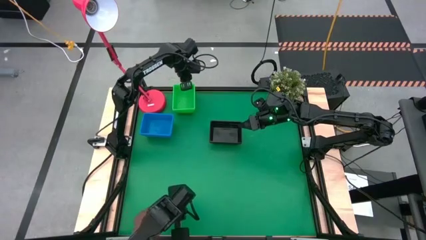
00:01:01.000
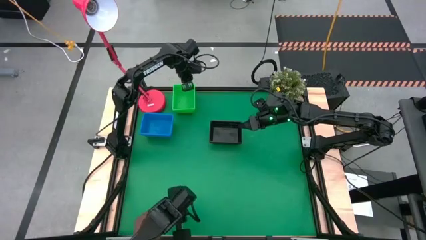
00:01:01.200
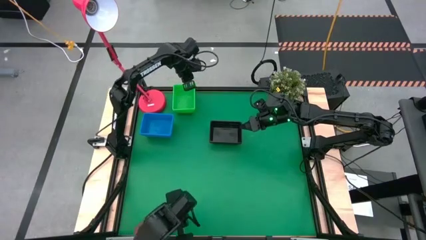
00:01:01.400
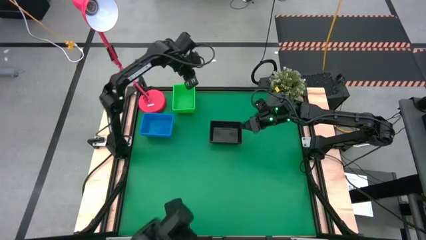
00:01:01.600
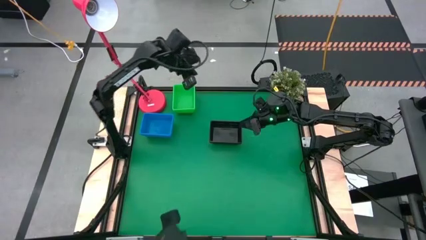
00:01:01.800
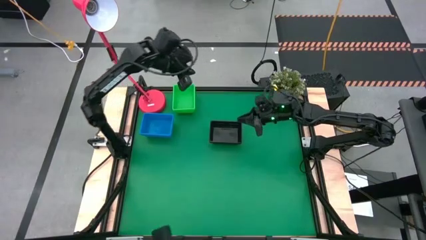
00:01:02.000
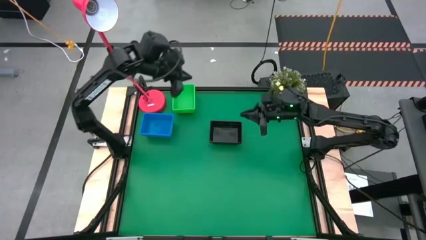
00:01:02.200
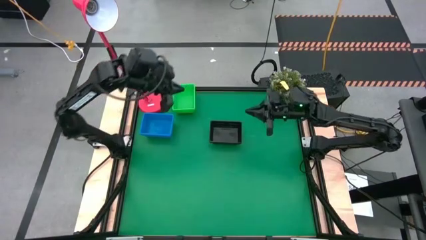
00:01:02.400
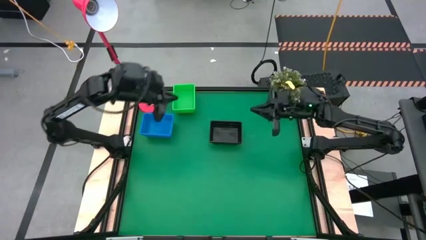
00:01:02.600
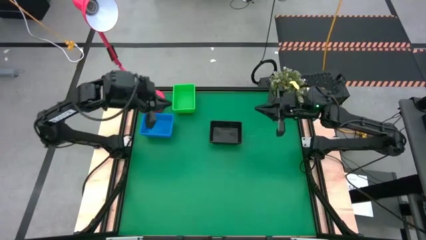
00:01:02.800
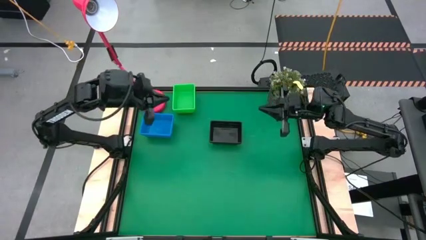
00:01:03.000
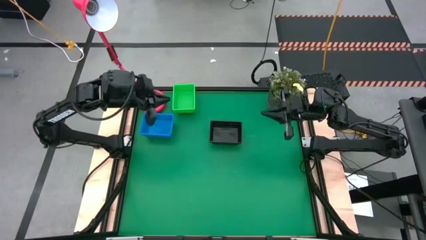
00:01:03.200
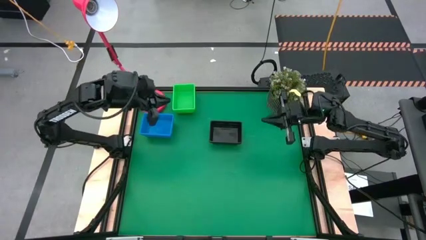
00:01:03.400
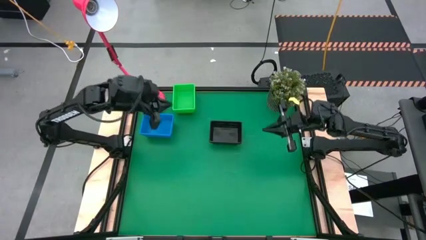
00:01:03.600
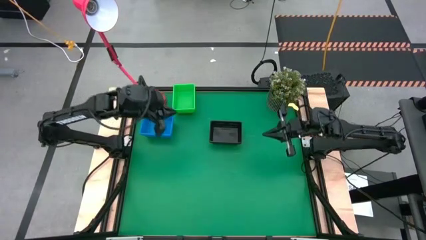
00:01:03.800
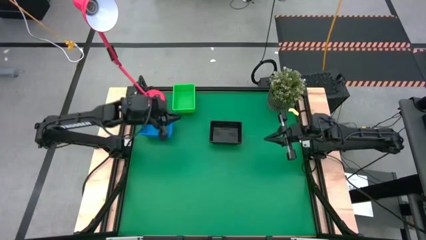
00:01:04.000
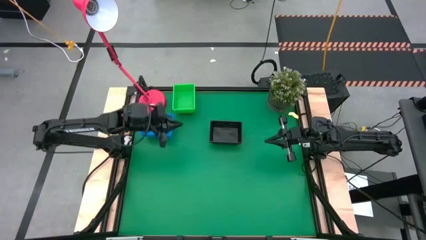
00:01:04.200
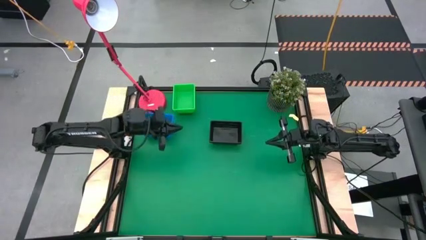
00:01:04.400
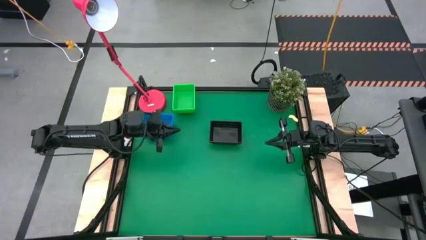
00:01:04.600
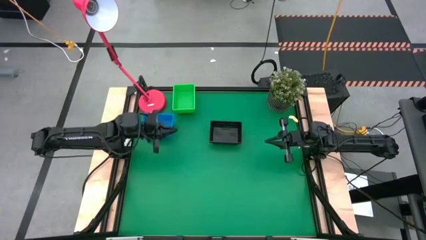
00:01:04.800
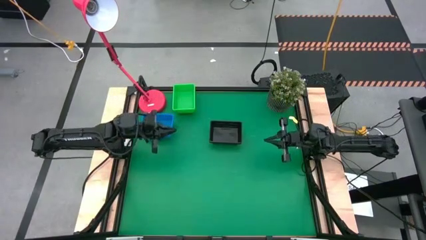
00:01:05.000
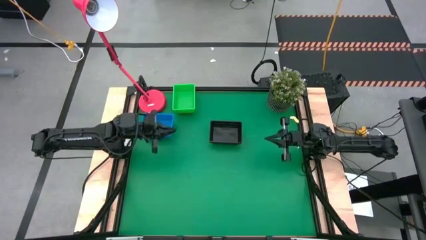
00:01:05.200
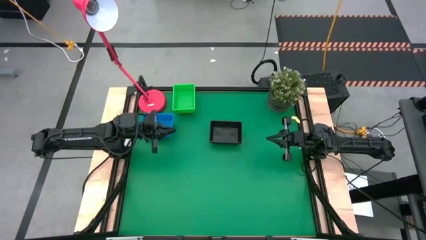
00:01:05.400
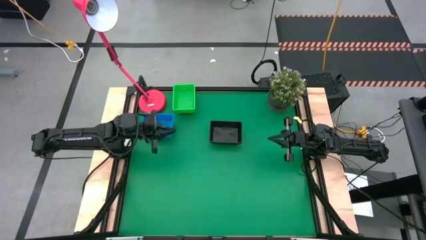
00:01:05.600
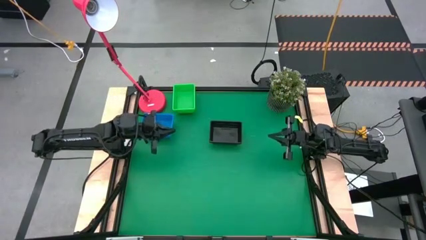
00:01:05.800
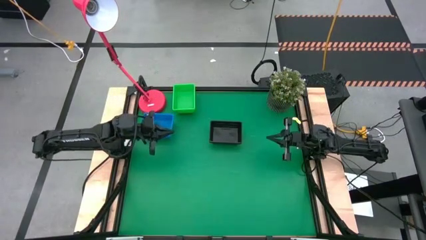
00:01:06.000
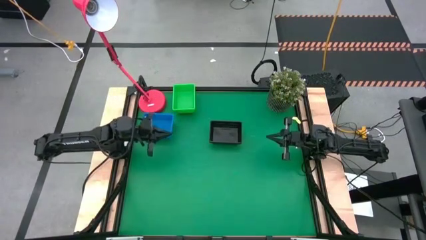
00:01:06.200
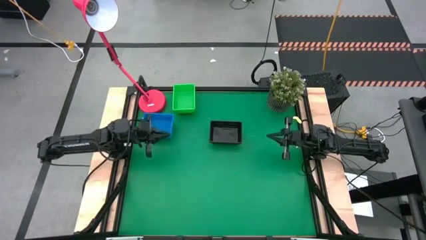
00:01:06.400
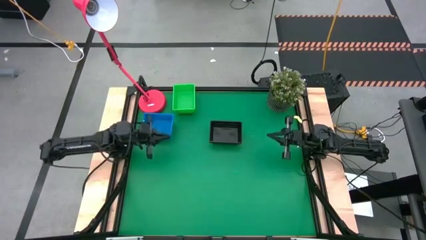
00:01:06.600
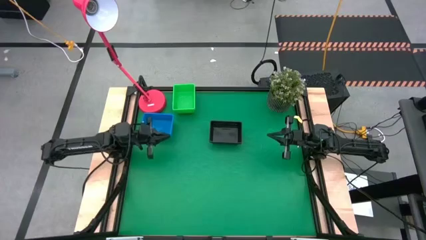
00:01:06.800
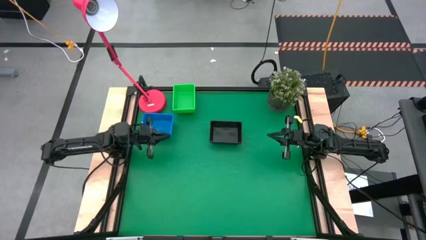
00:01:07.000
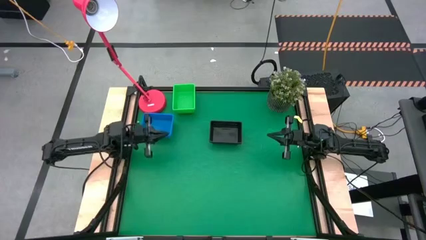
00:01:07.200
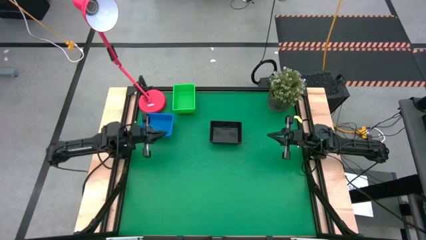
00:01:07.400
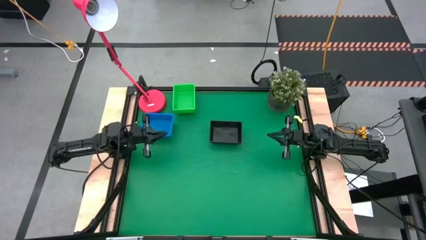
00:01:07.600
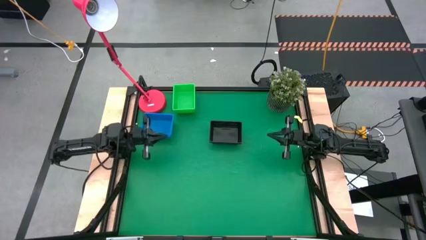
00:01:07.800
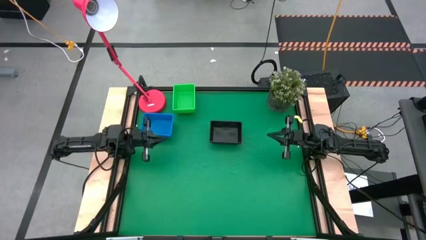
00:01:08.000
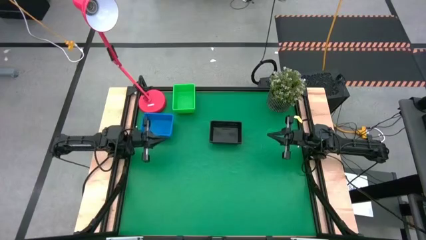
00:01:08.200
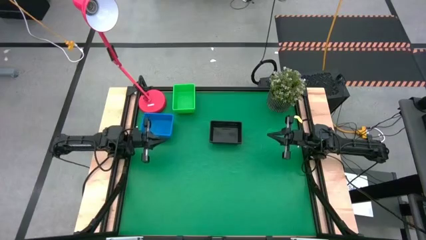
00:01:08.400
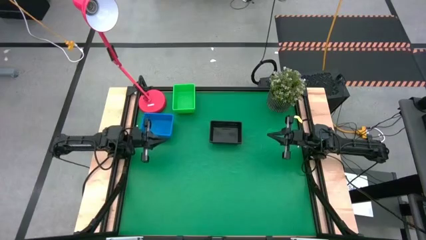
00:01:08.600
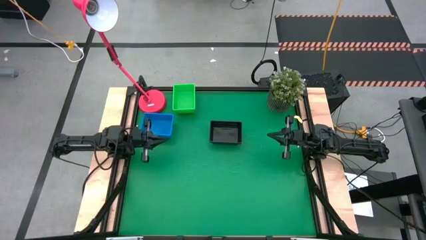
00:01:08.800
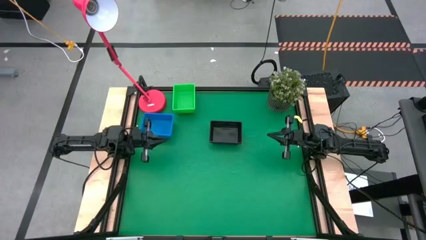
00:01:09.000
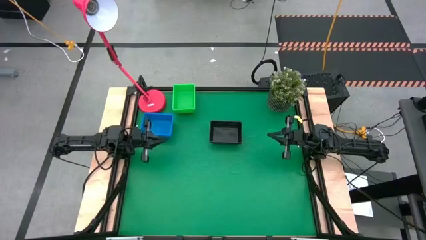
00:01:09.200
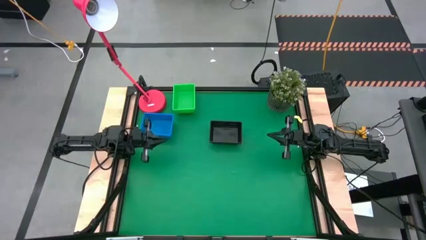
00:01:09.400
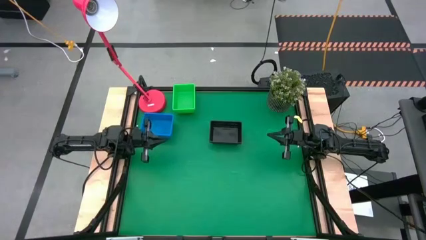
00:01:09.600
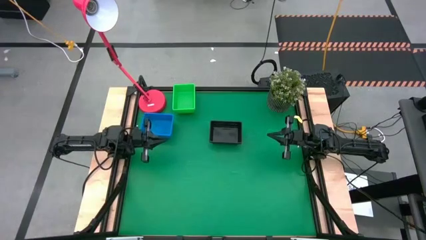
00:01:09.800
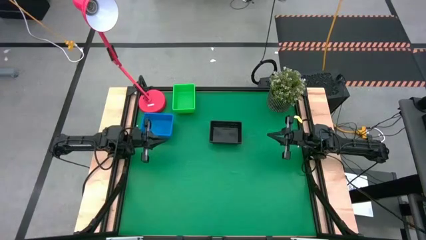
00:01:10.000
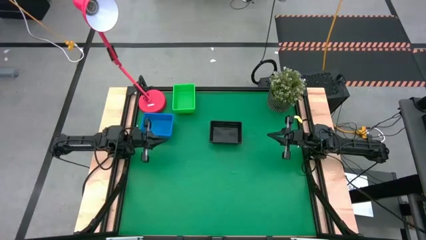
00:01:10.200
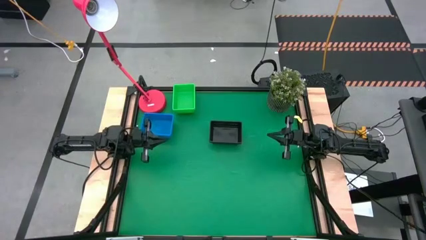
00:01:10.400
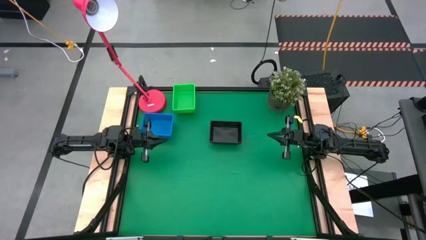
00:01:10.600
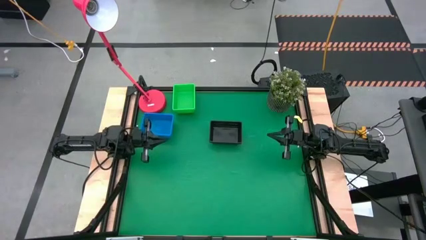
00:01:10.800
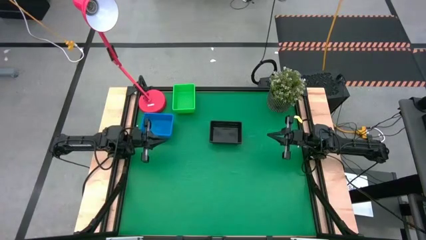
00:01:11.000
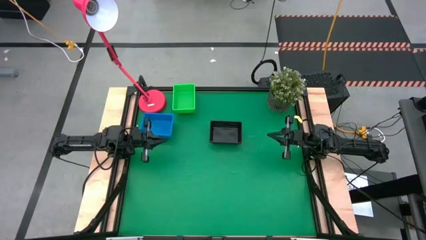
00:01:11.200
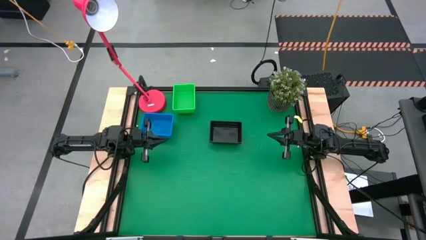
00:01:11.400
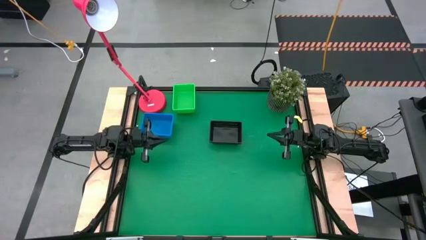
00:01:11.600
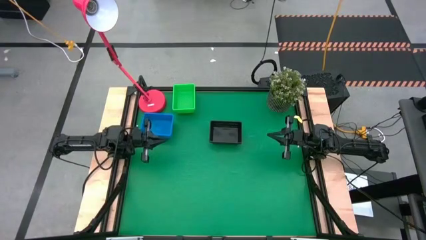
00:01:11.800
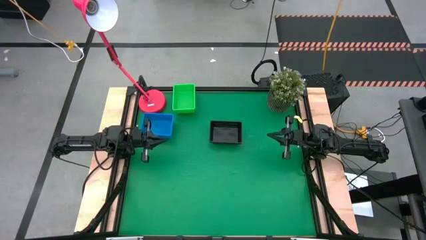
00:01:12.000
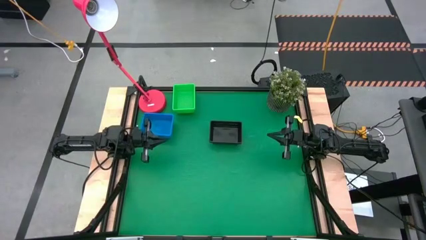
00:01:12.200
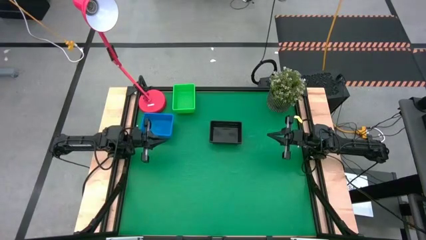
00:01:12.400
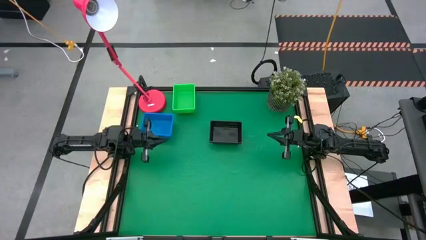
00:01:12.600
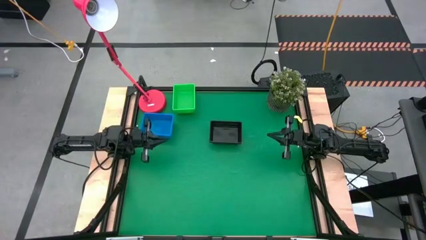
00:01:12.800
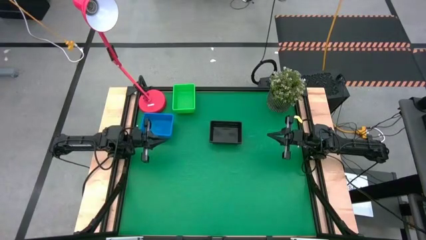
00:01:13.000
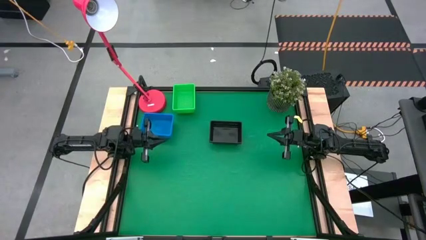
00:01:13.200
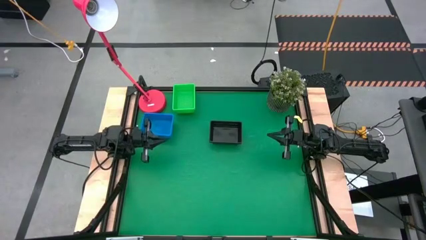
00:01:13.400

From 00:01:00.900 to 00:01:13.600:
Return to Home Position
